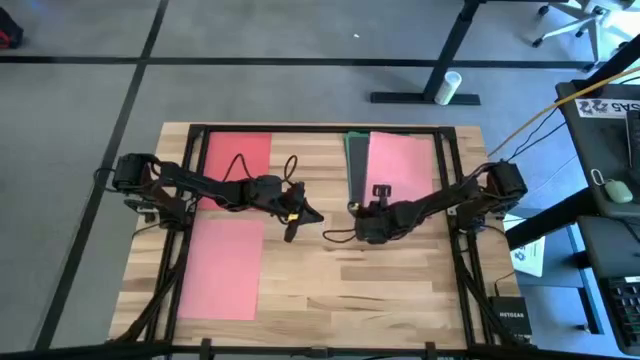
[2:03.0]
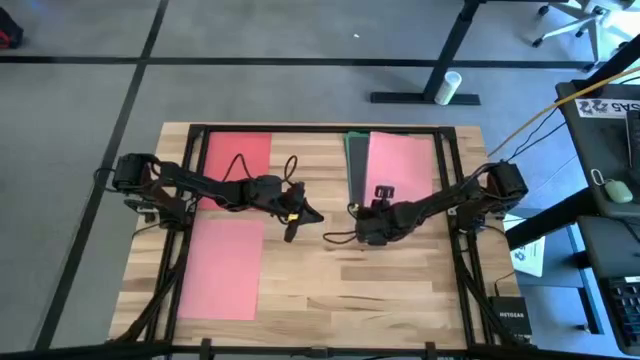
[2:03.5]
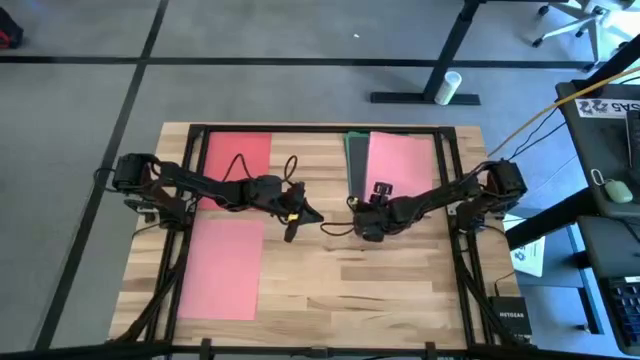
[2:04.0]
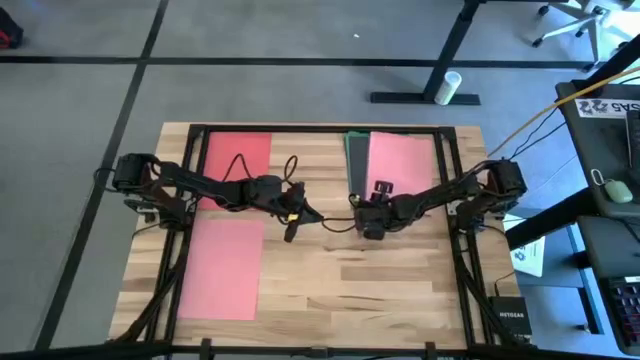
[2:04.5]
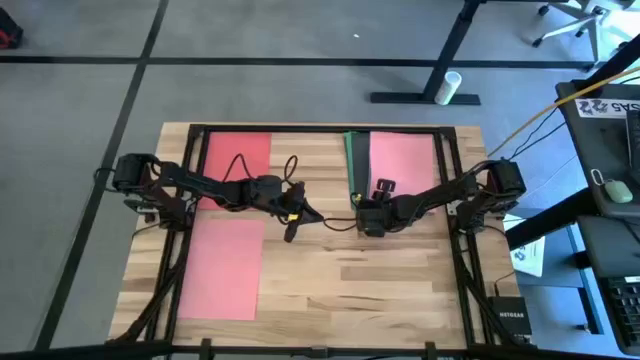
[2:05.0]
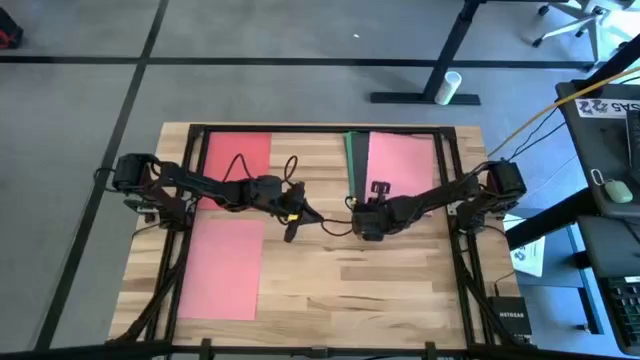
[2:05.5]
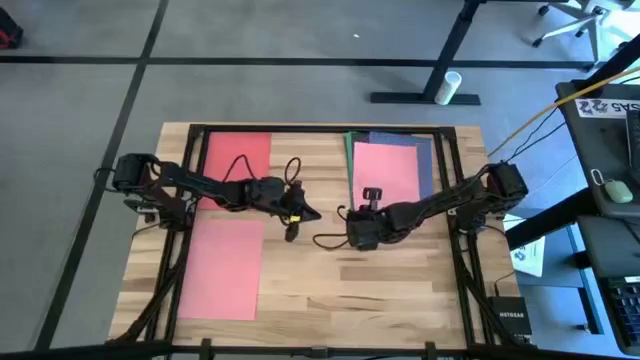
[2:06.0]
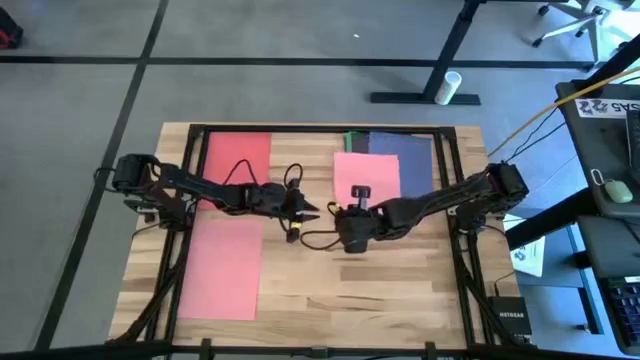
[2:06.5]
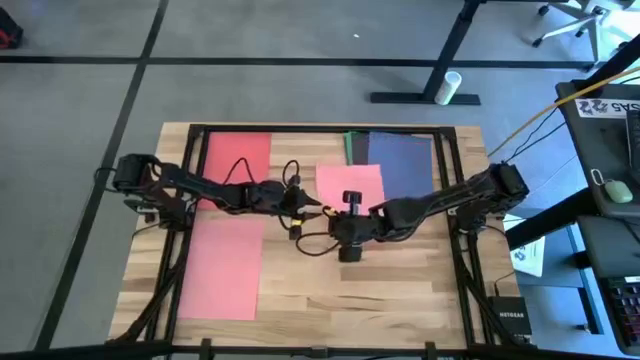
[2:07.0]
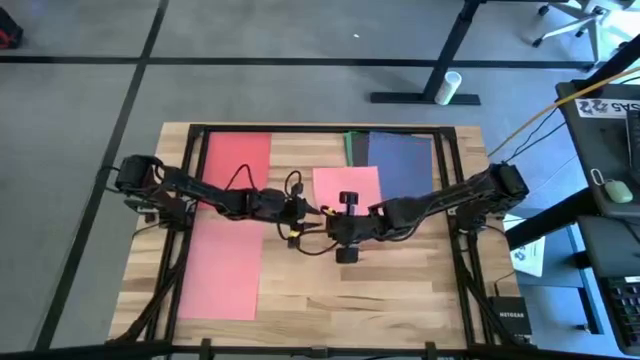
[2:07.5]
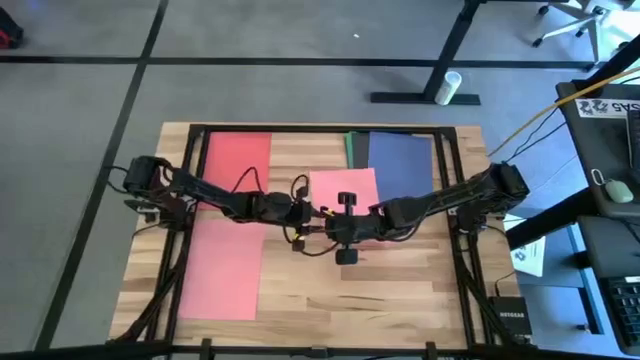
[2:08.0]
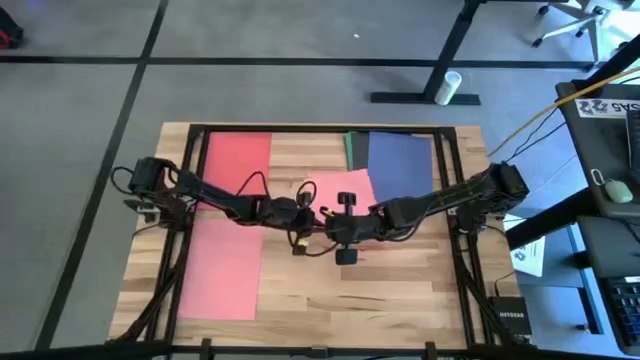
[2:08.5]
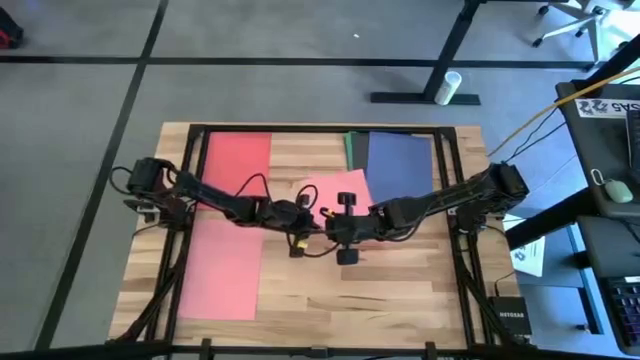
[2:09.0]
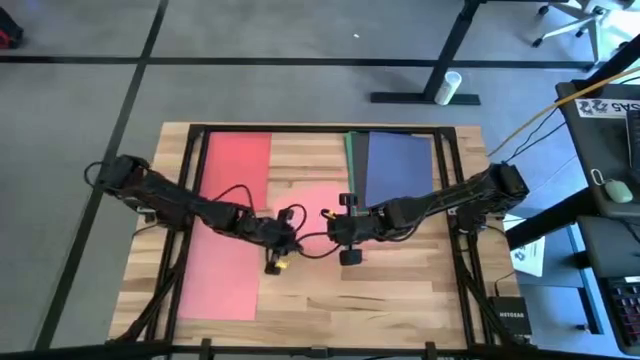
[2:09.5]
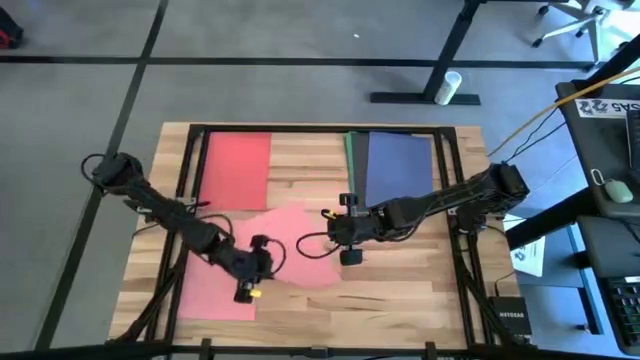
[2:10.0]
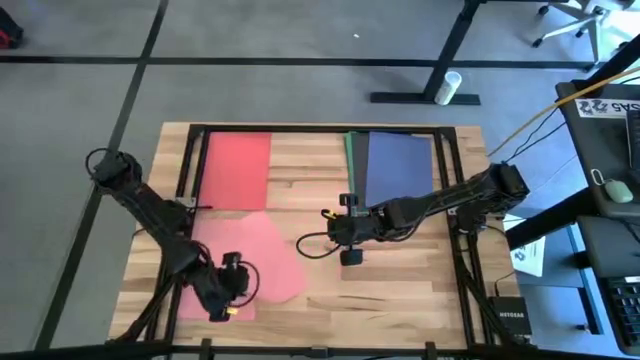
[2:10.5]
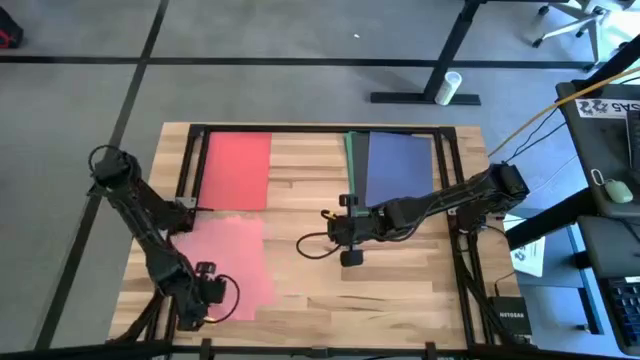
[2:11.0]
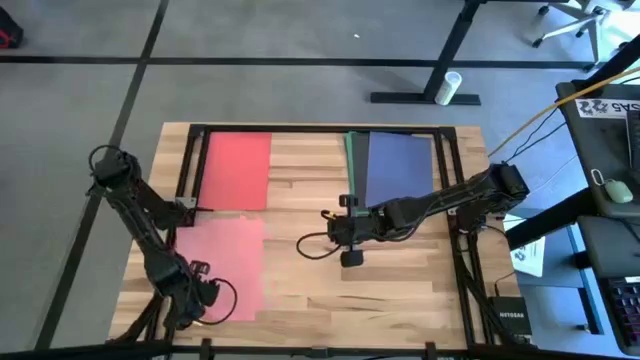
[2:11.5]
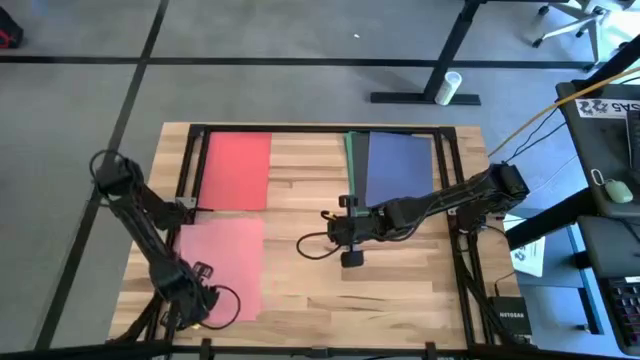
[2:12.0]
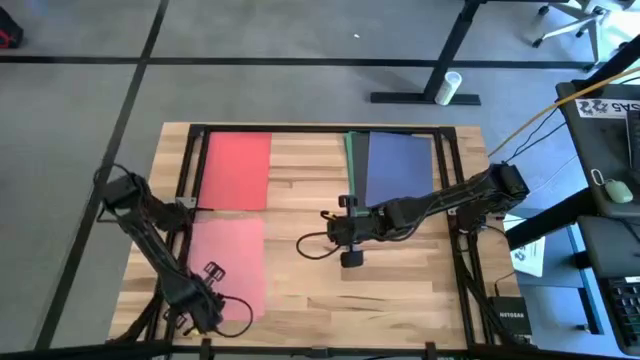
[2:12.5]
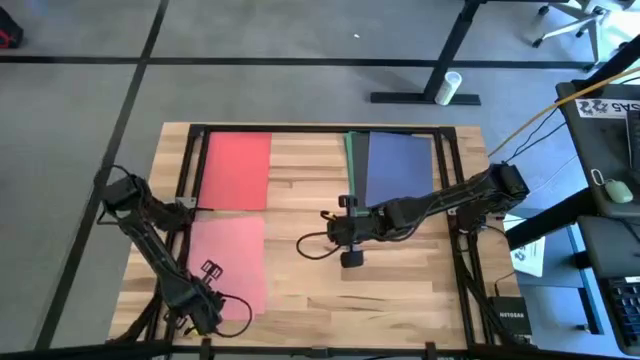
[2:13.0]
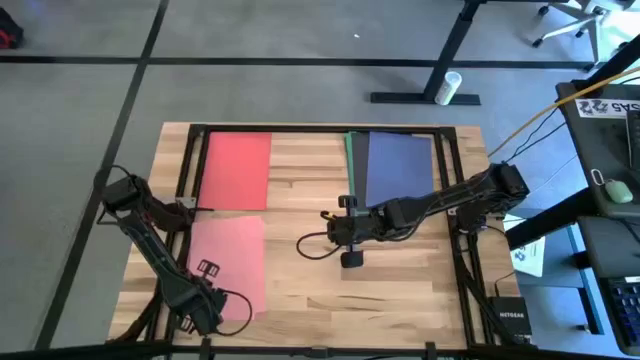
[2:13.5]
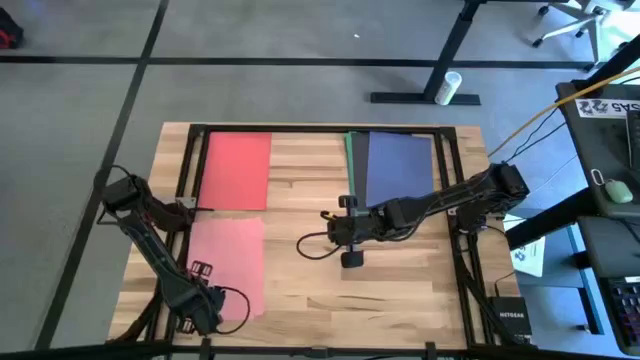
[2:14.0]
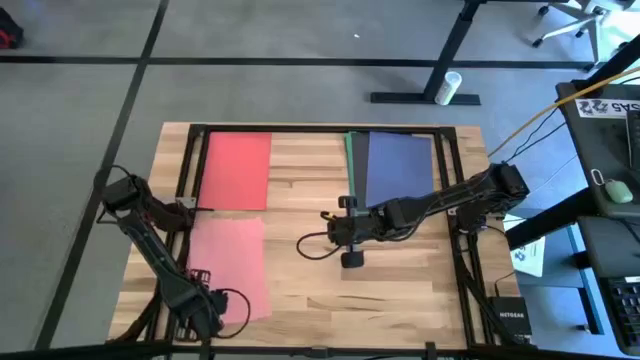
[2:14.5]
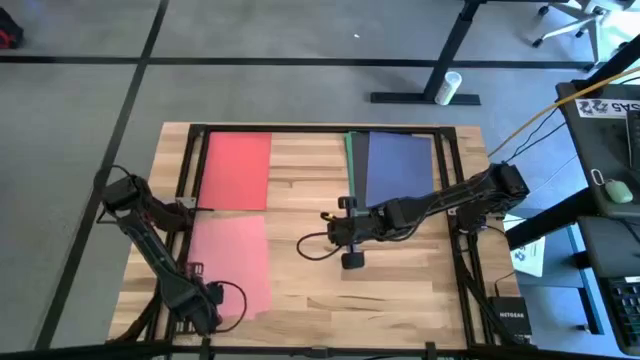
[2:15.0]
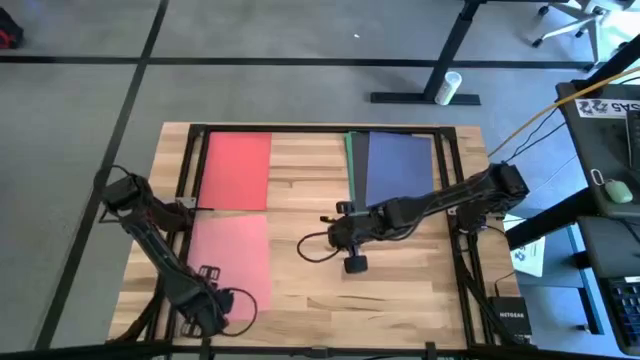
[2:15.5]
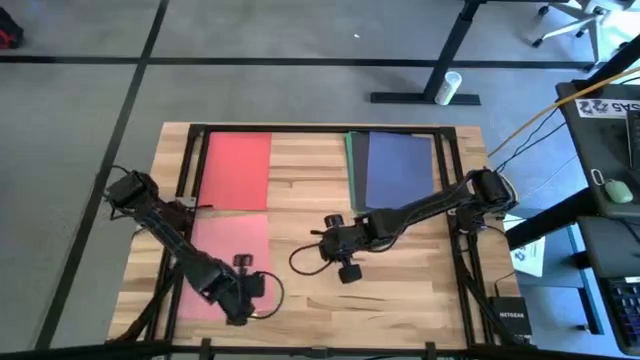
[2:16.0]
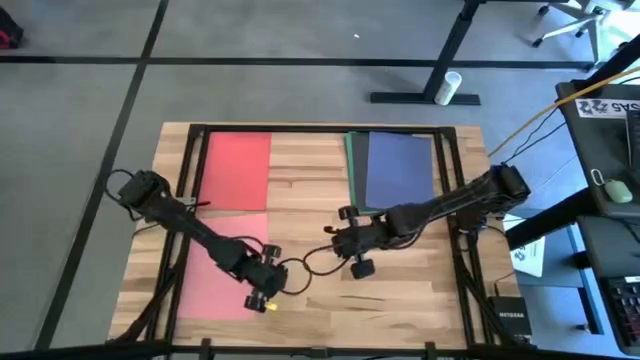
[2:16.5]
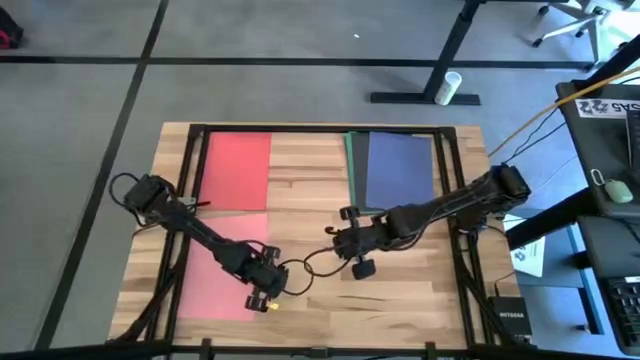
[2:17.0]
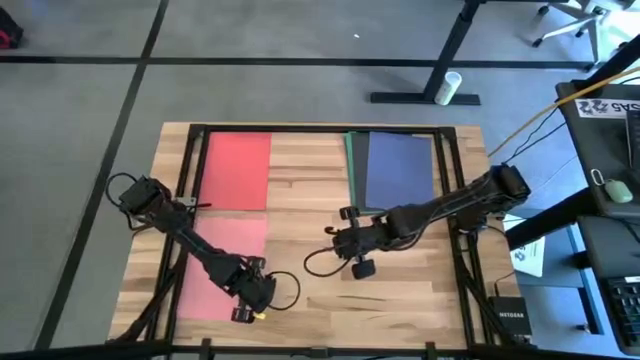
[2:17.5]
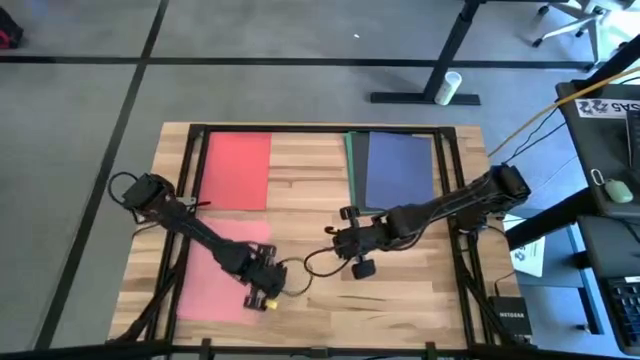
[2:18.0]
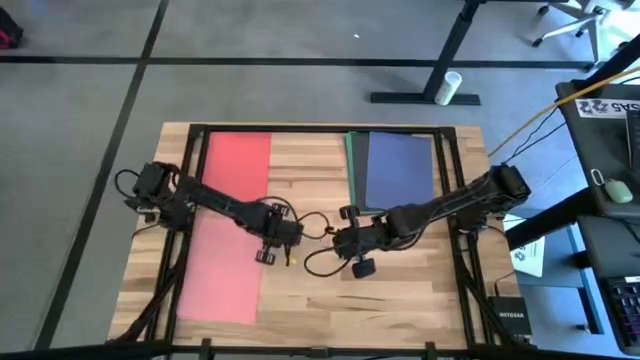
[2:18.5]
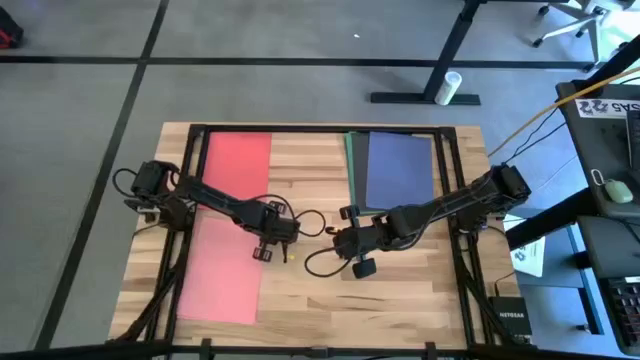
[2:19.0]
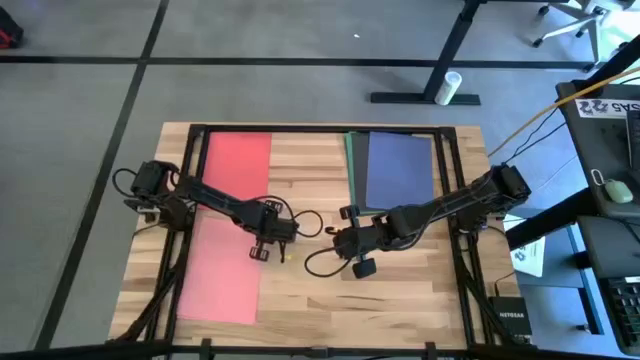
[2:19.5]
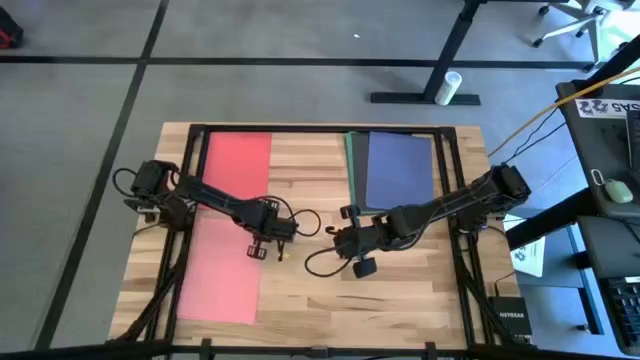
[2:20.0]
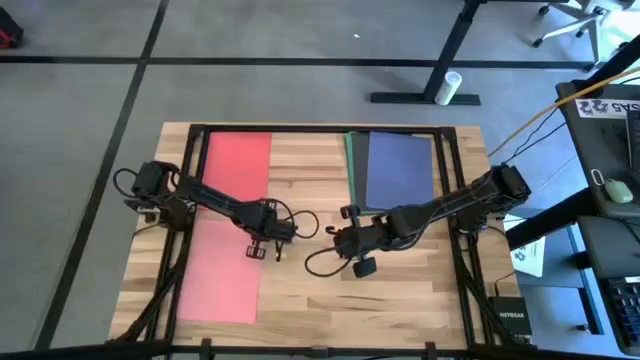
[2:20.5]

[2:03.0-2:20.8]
Task: Organize paper
Stack the pink paper on top of the pink papers

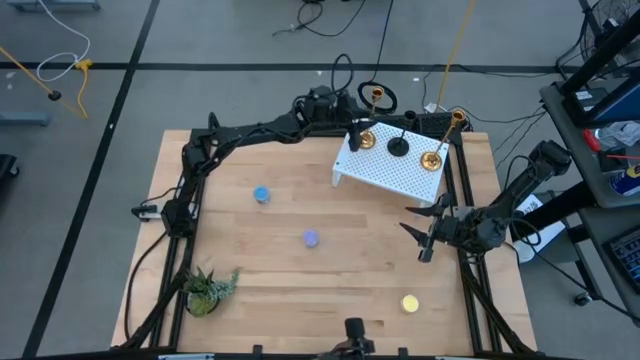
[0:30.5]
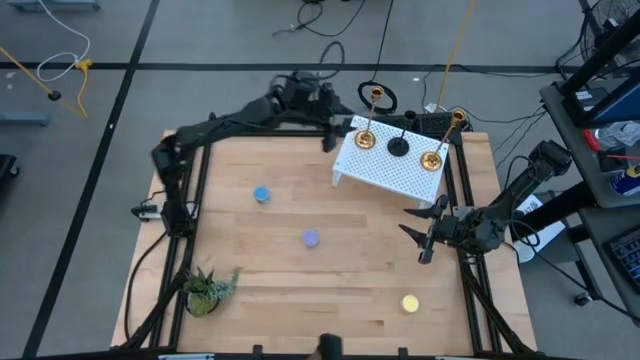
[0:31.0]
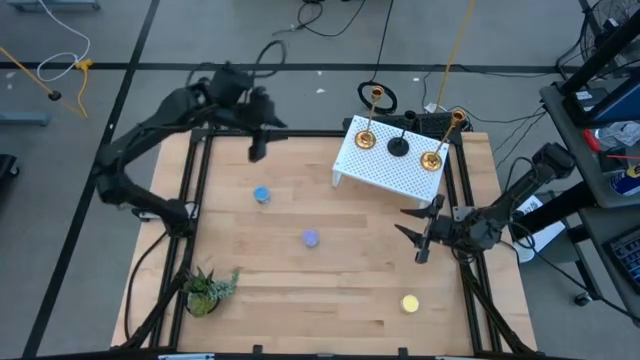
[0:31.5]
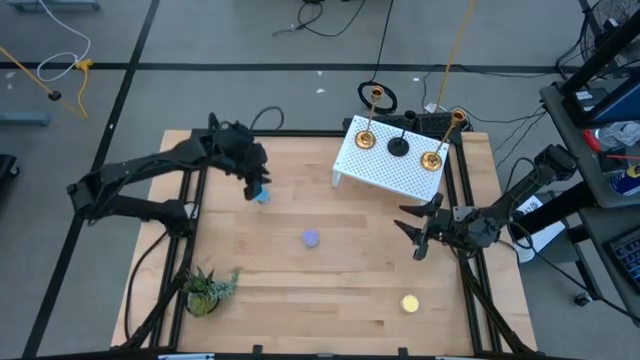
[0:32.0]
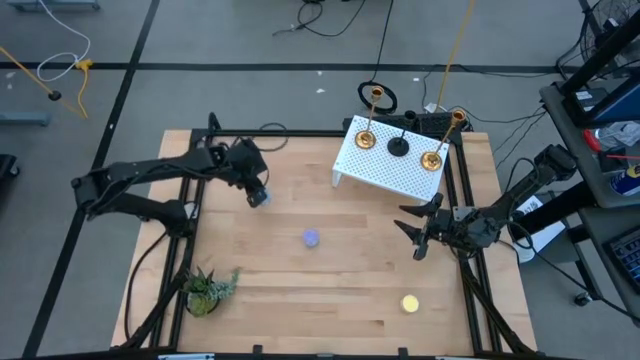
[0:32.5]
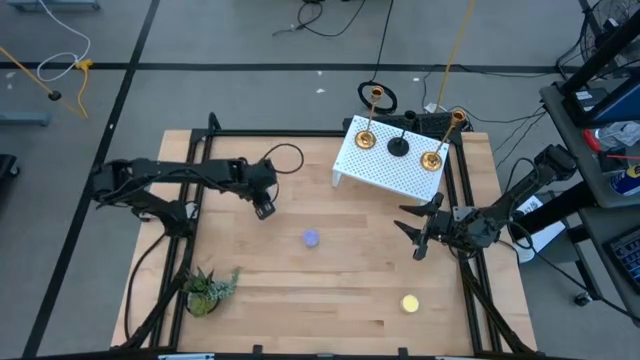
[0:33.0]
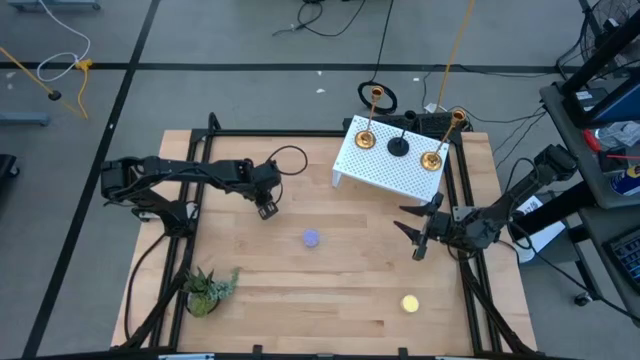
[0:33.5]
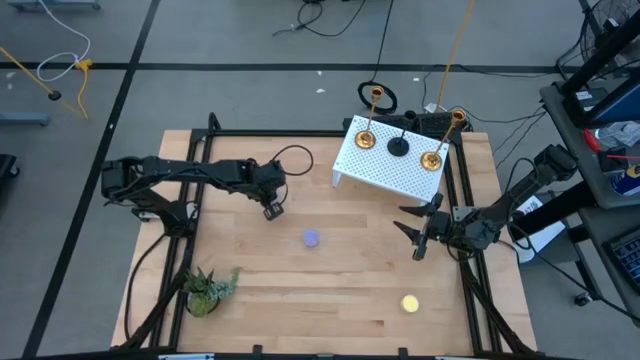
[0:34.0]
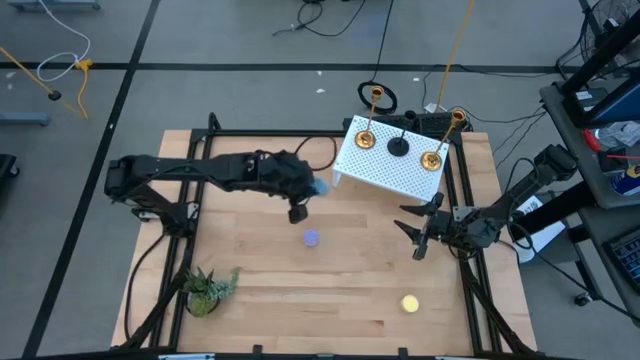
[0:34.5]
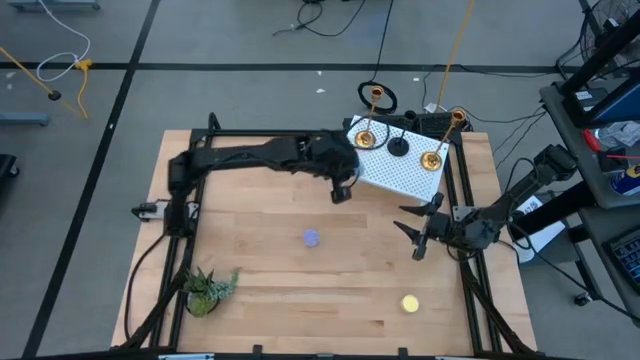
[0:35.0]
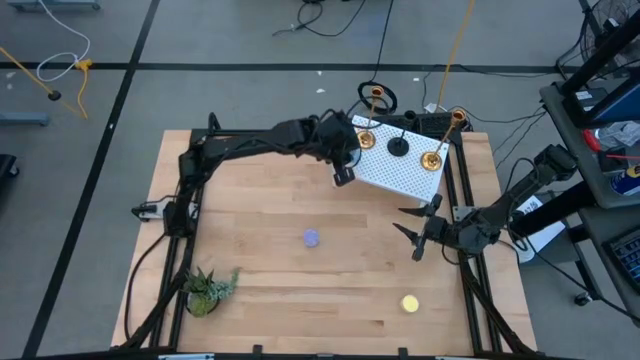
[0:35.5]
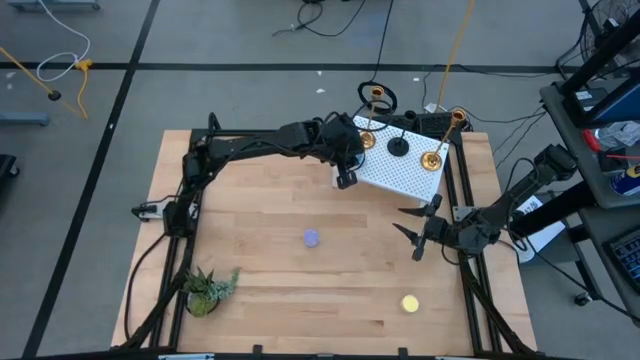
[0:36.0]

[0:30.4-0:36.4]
Task: Pick & Place candle stick holders
Put the blue scented candle on the shelf
